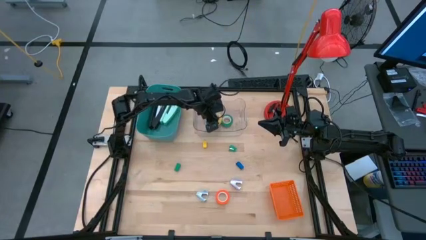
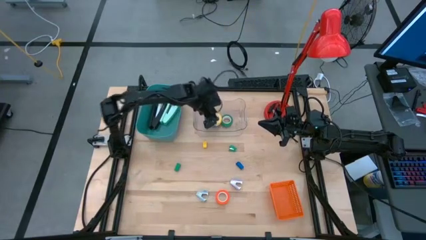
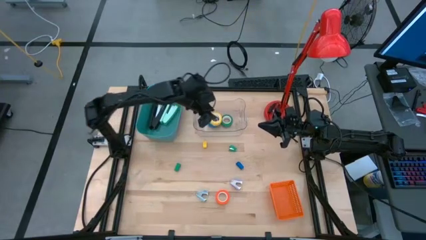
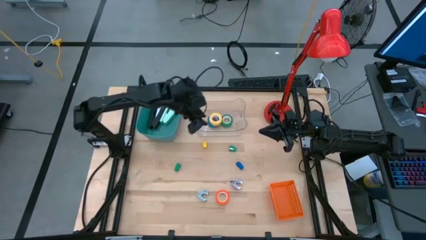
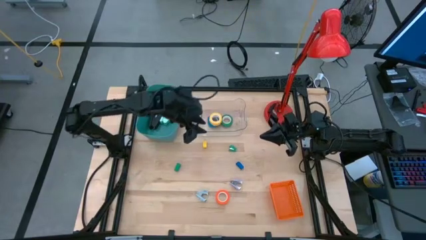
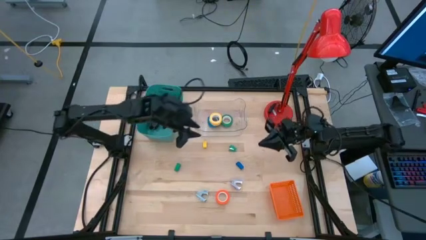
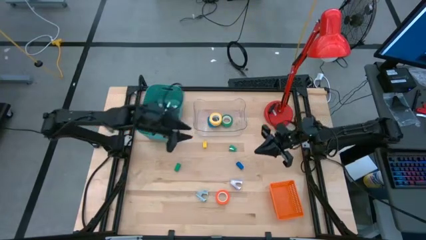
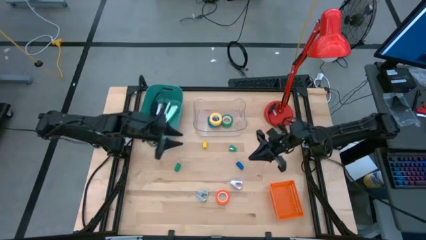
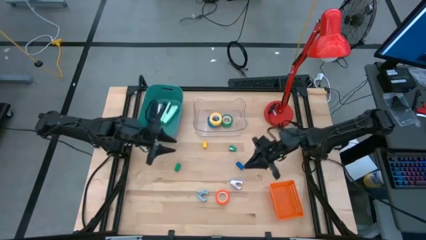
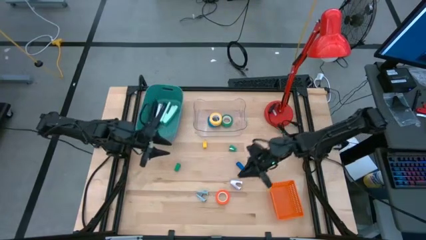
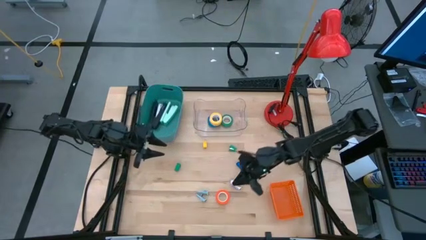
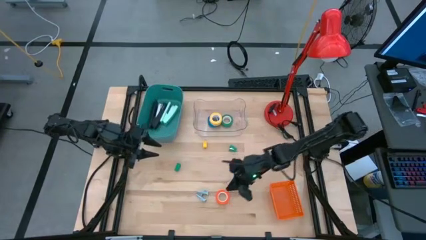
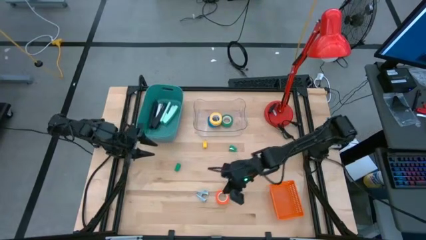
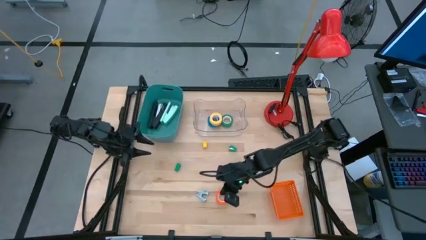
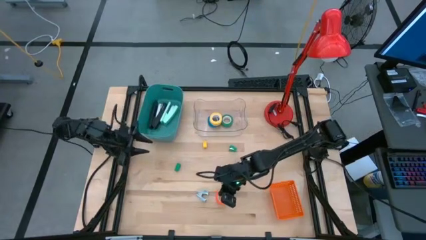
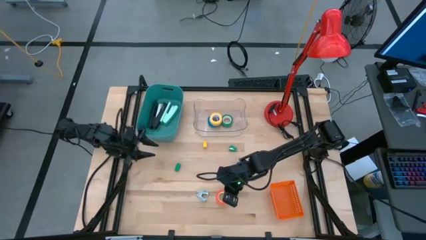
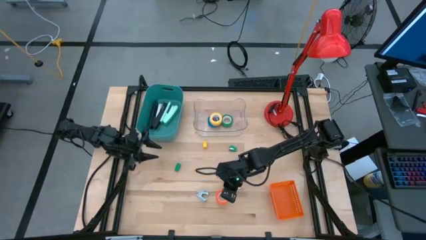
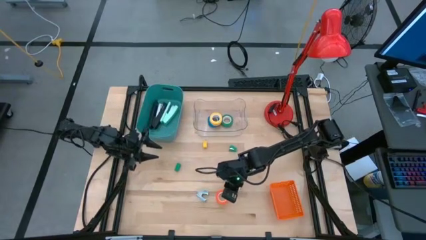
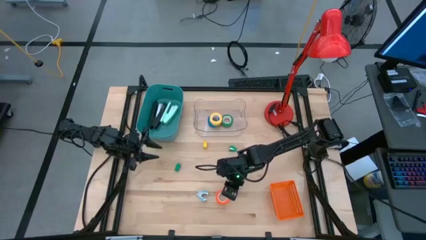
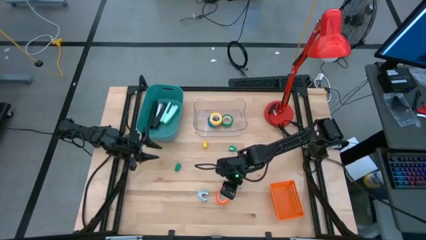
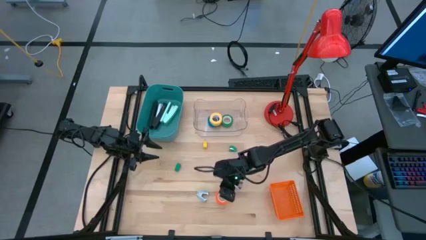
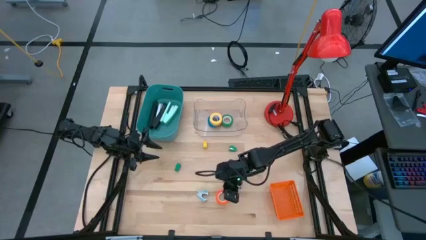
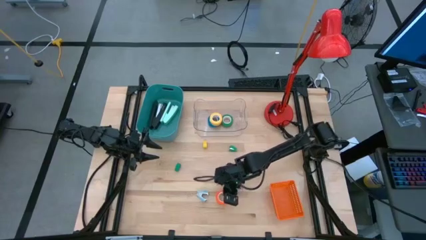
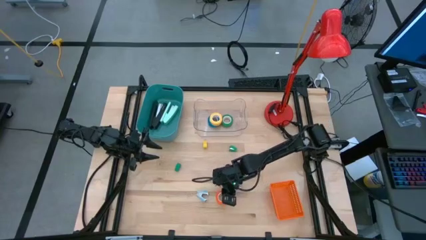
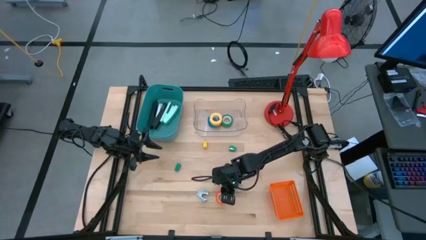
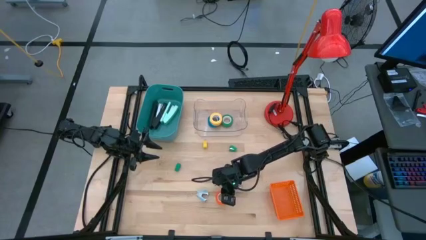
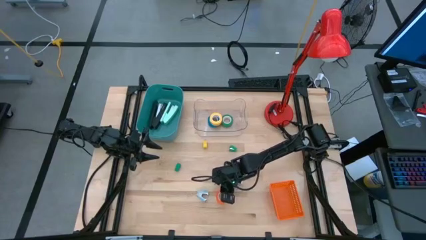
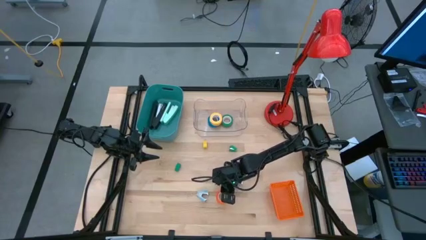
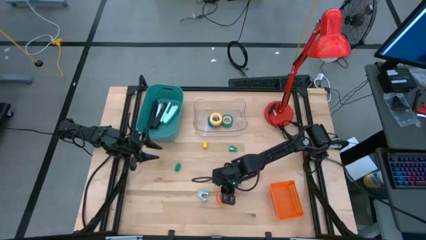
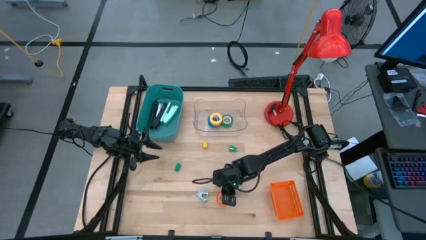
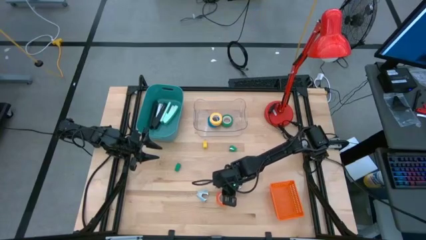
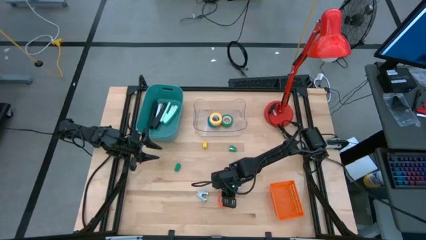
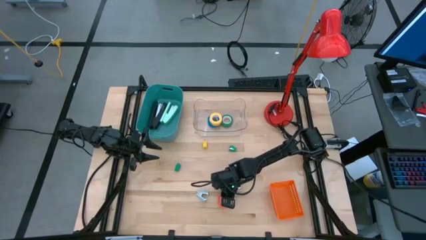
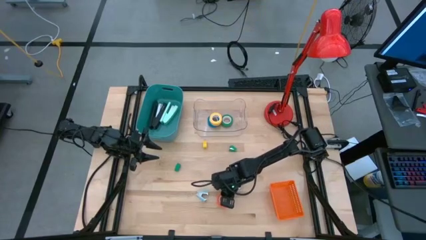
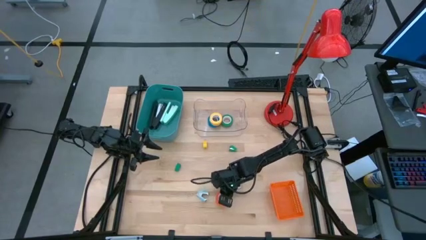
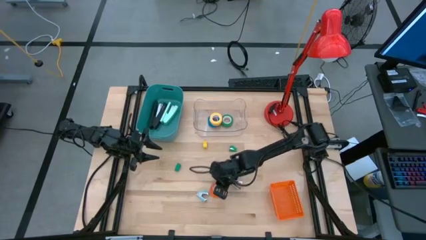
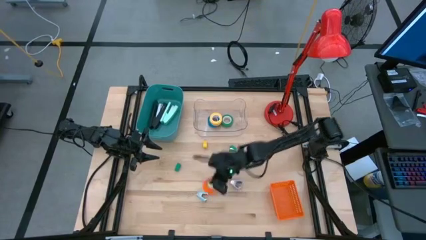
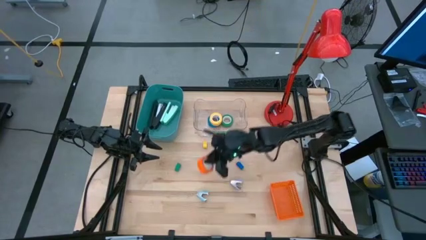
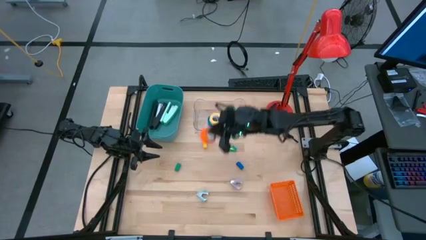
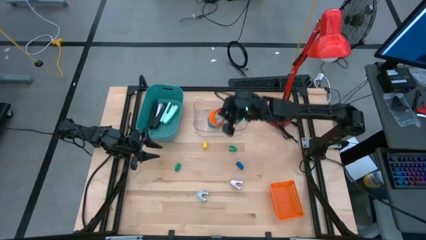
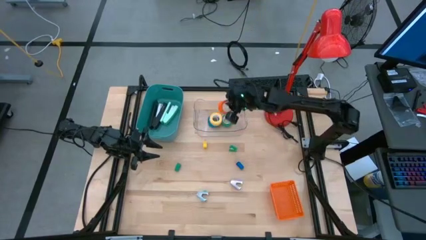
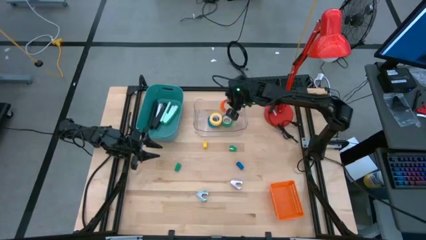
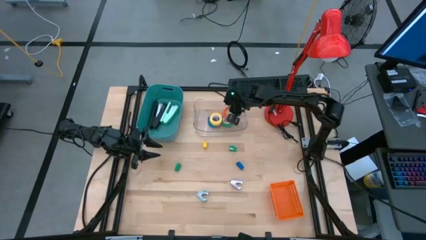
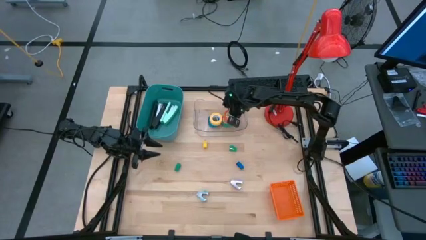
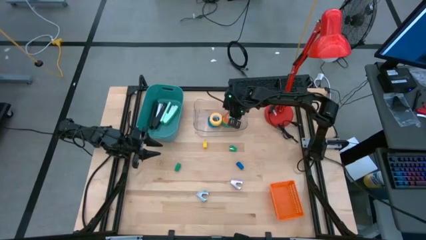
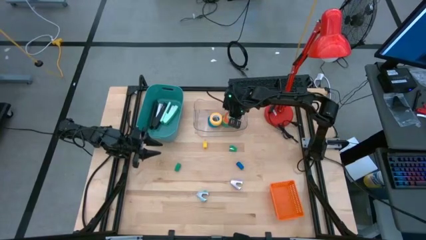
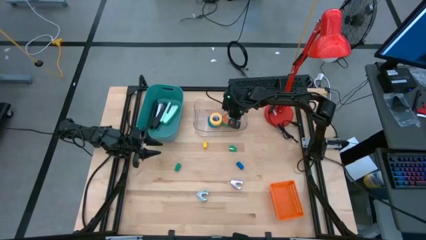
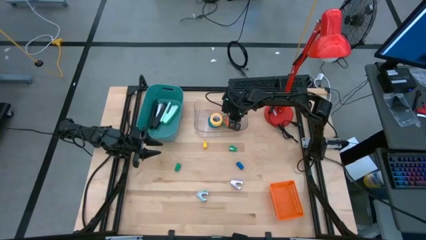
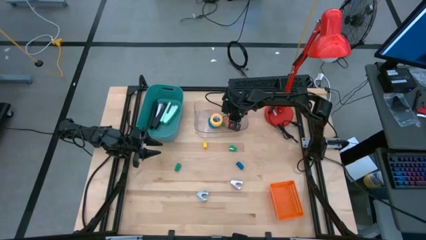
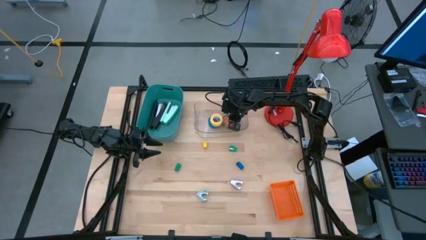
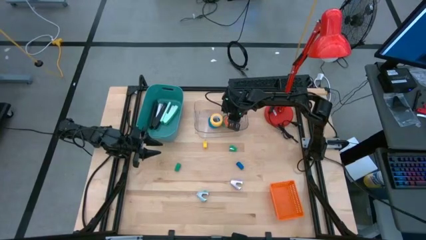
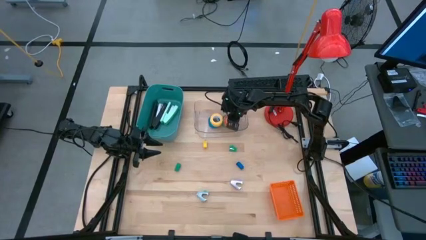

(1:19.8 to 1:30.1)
Task: Pick and place Stapler, Stapler remover, tape
Put the orange tape into the transparent bin
